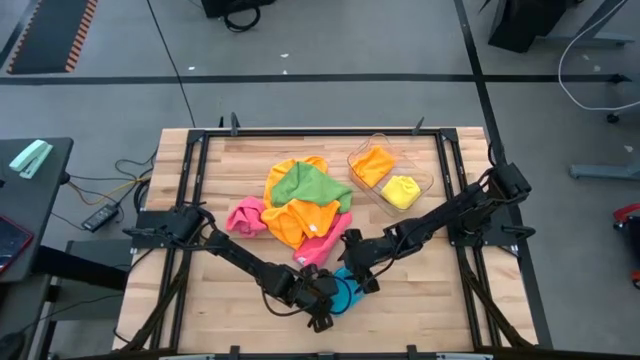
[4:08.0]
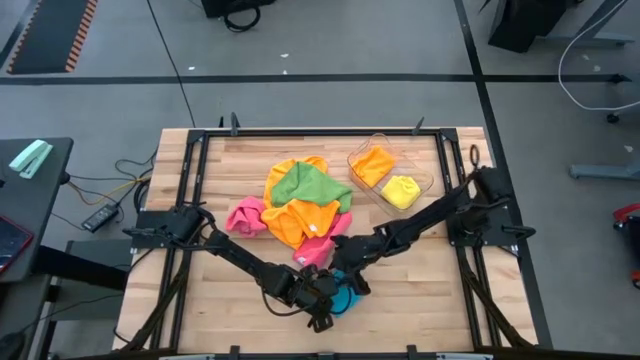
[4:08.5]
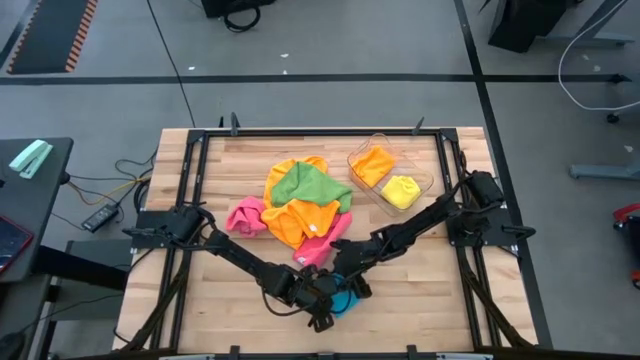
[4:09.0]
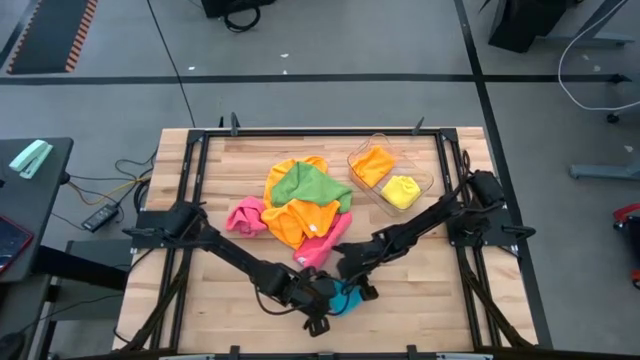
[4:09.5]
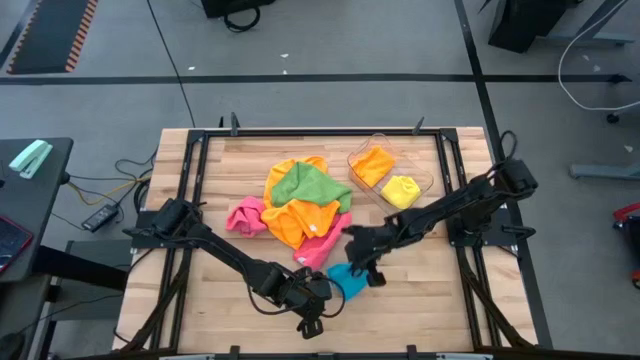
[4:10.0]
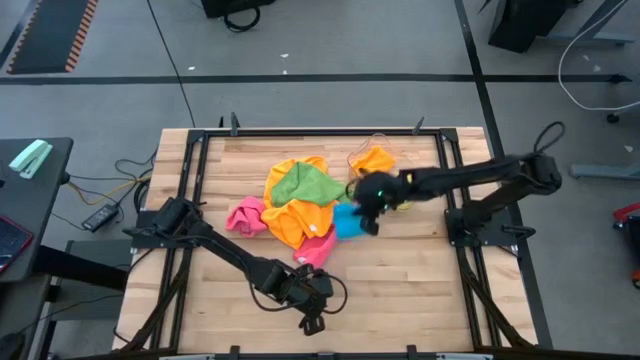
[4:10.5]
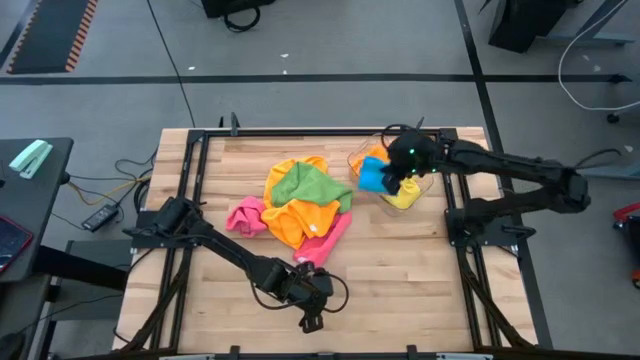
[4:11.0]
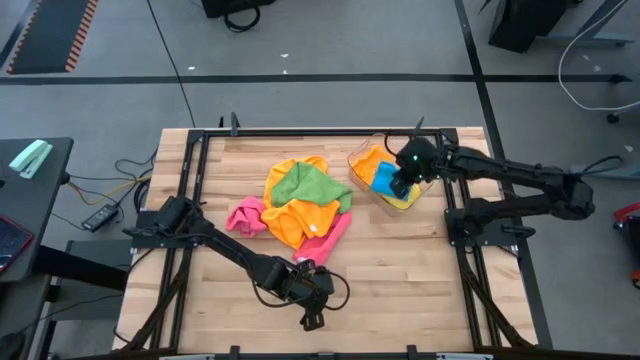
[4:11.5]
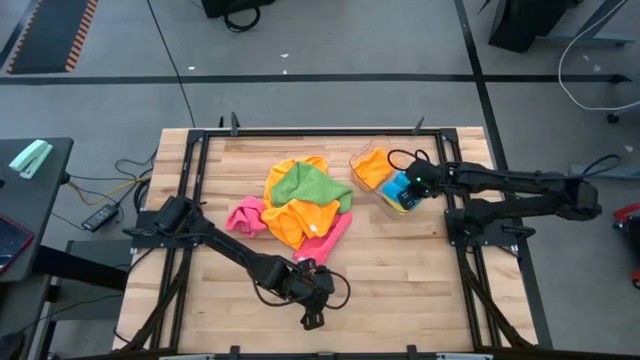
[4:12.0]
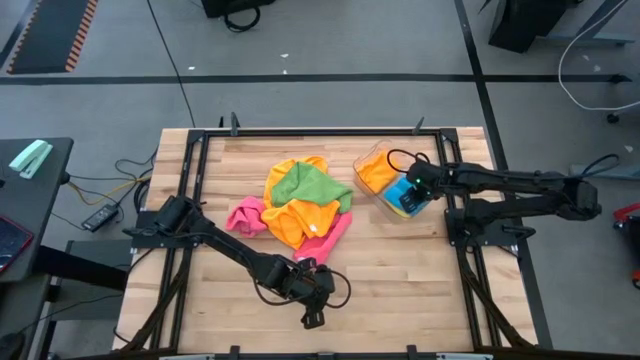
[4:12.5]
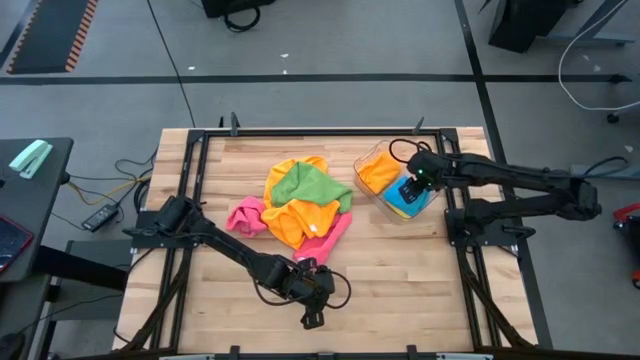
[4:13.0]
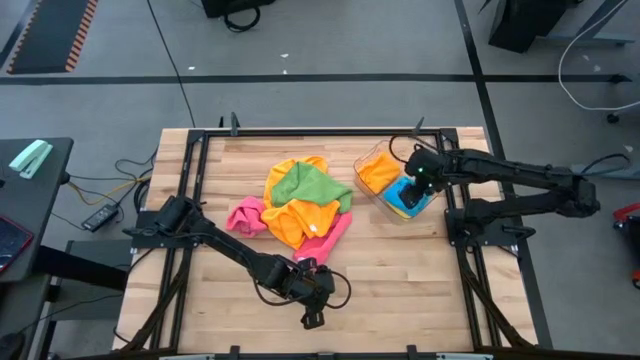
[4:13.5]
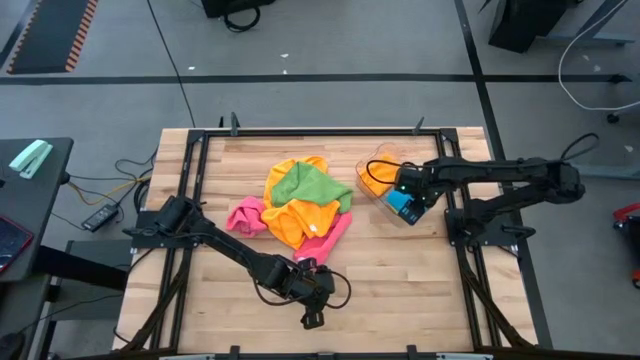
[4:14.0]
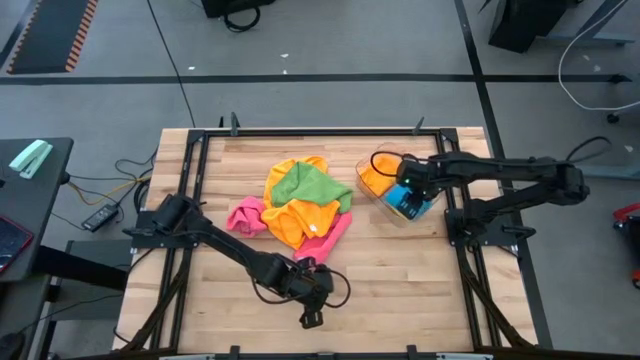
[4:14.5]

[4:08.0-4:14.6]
Task: Fold microfiber towels
Put the blue towel into the transparent bin

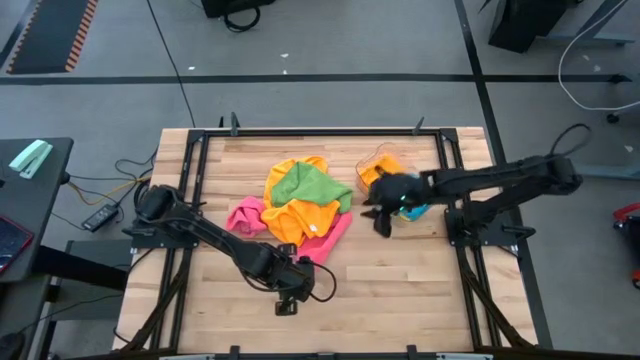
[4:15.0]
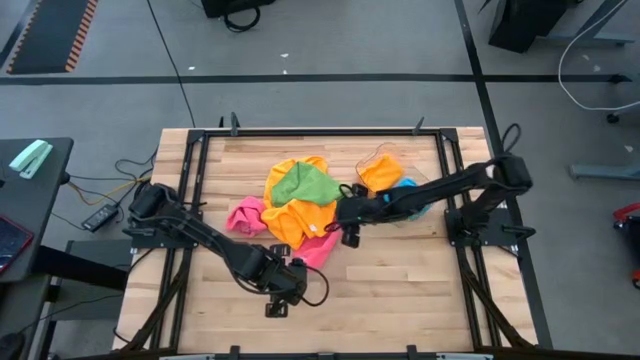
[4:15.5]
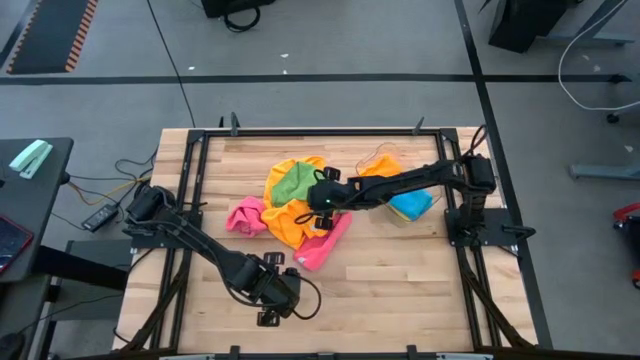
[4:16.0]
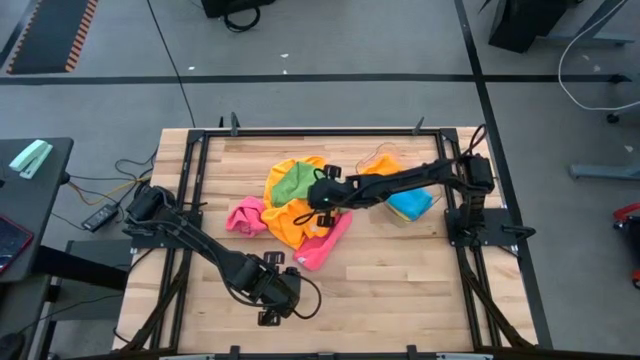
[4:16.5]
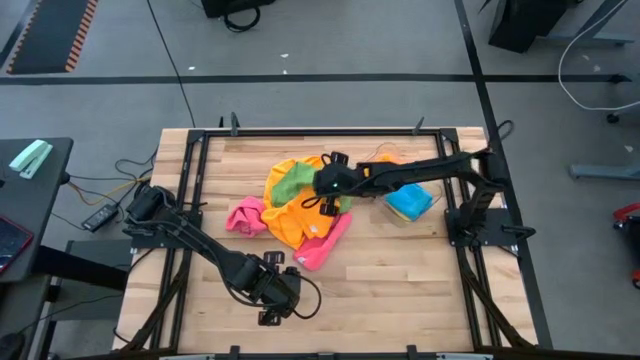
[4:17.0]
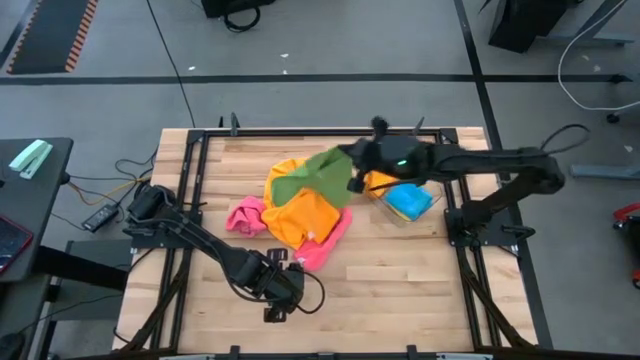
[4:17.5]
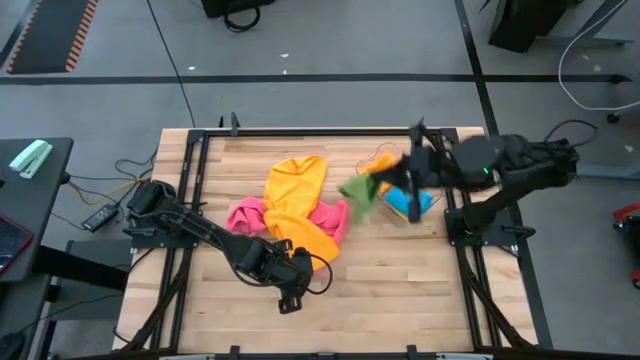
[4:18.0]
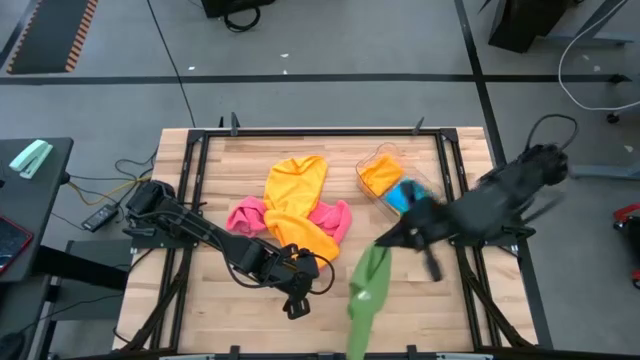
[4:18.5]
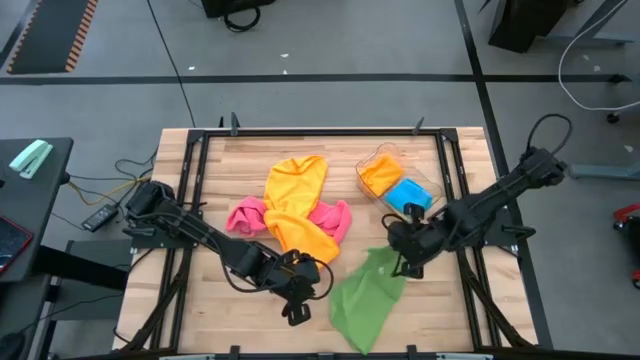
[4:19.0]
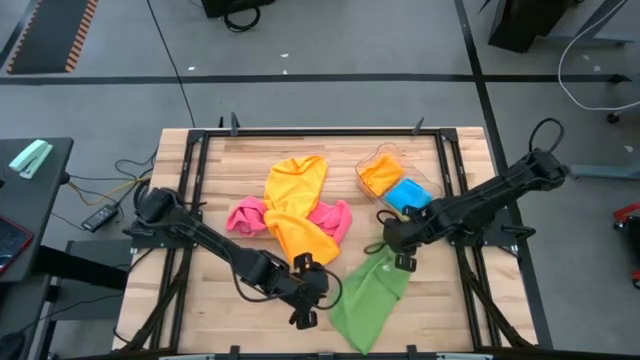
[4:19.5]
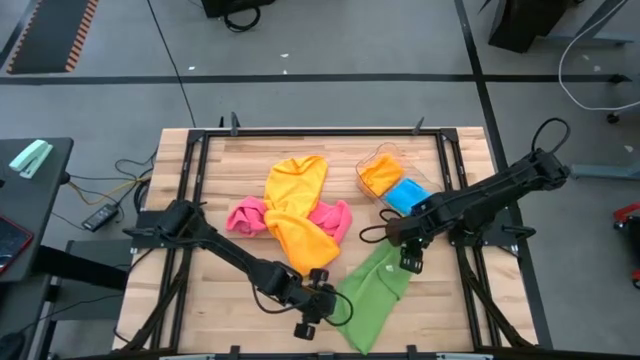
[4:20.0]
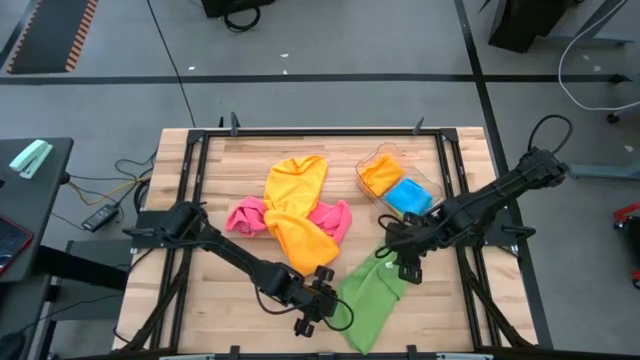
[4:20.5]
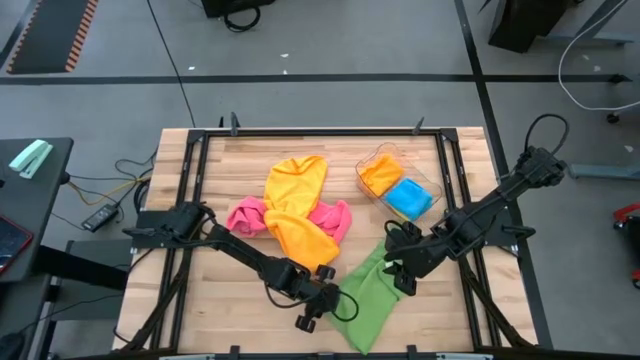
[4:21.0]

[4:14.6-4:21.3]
Fold the green towel

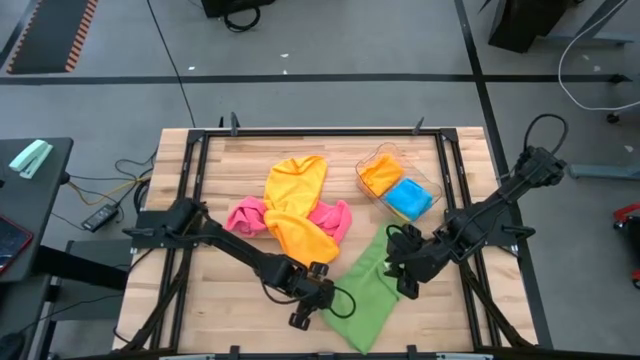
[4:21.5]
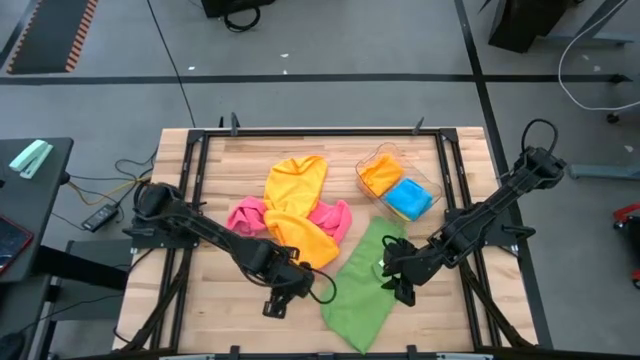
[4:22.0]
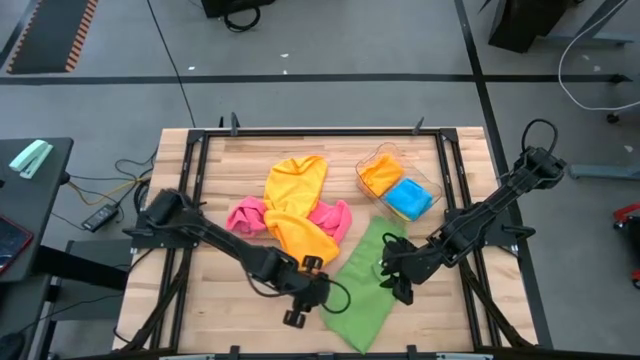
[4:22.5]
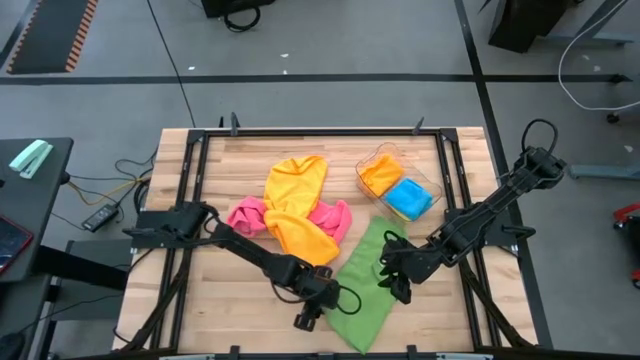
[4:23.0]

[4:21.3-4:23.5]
Fold the green towel

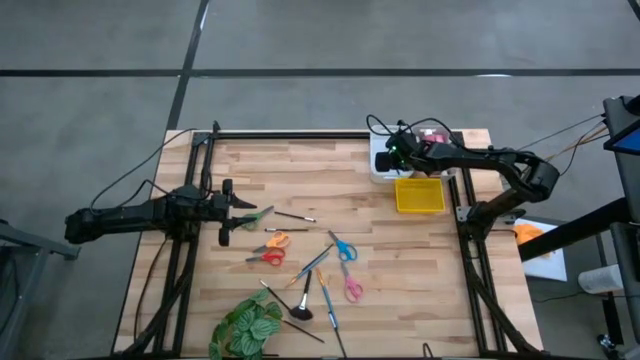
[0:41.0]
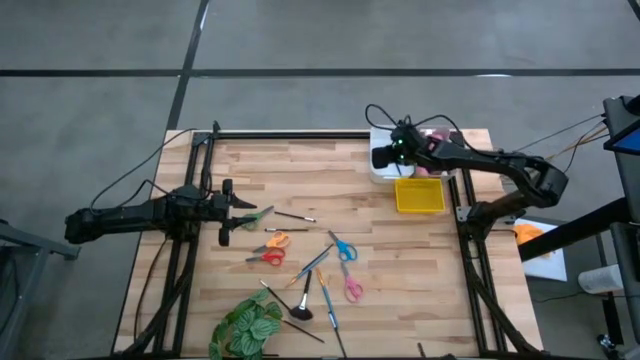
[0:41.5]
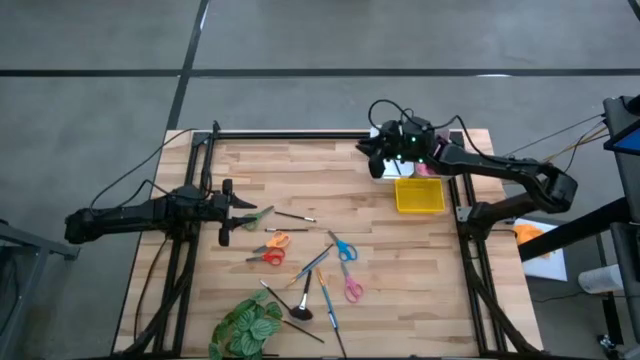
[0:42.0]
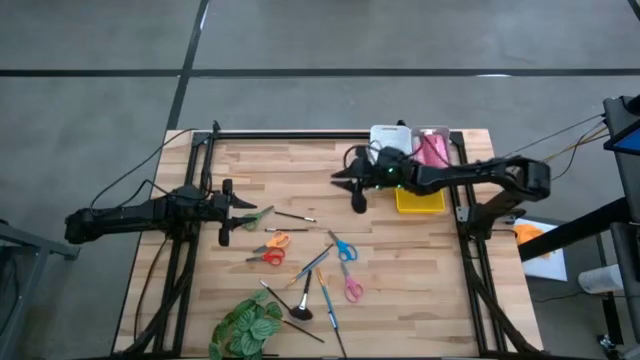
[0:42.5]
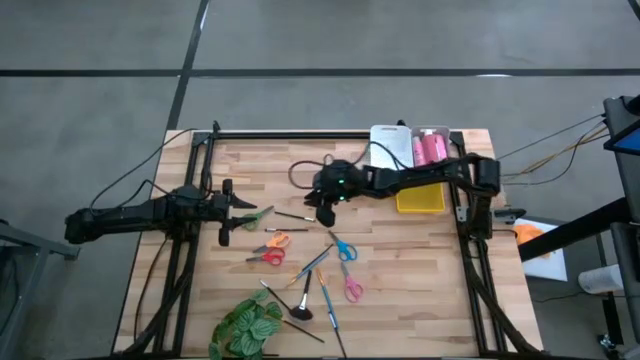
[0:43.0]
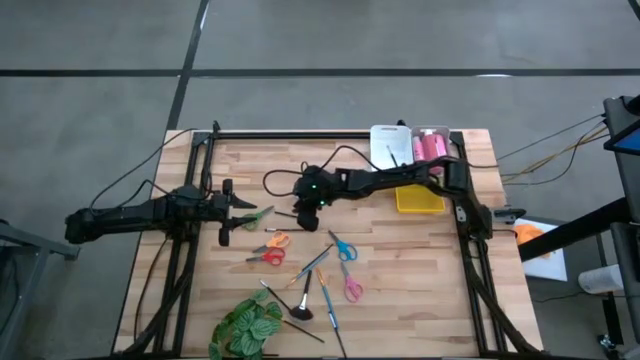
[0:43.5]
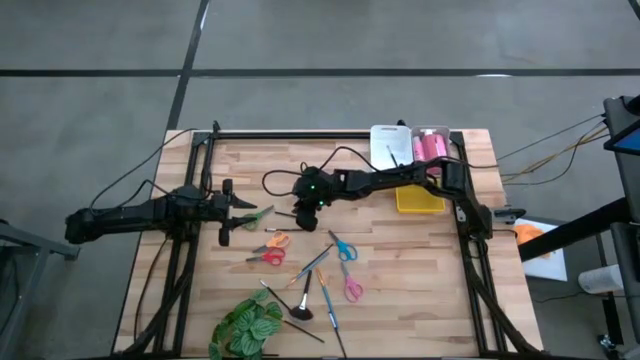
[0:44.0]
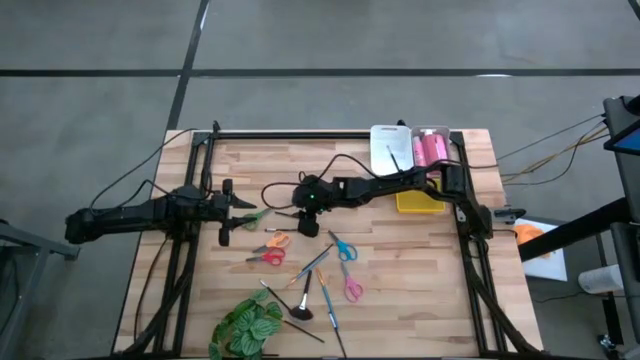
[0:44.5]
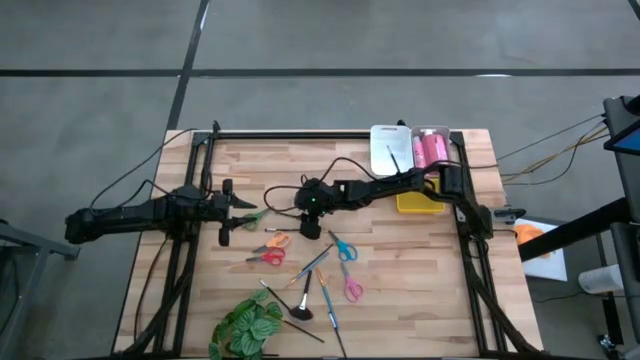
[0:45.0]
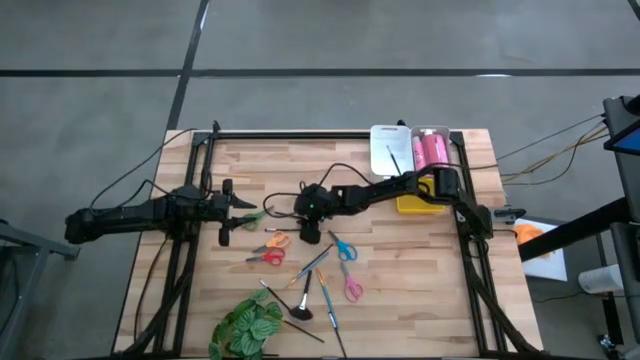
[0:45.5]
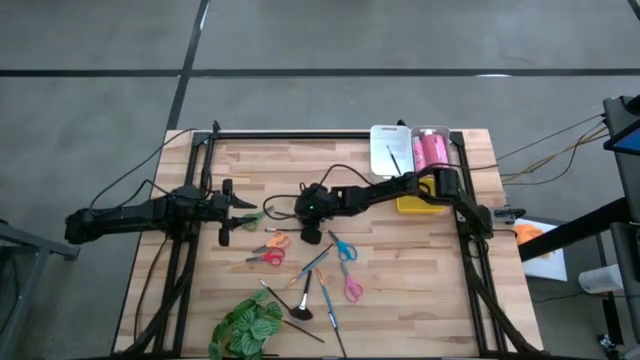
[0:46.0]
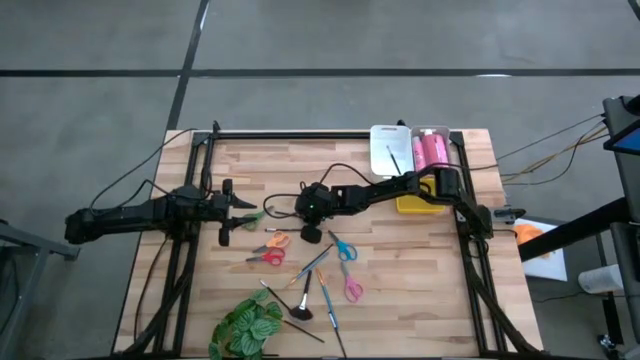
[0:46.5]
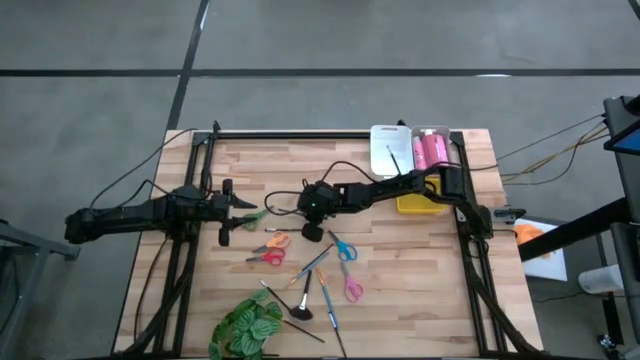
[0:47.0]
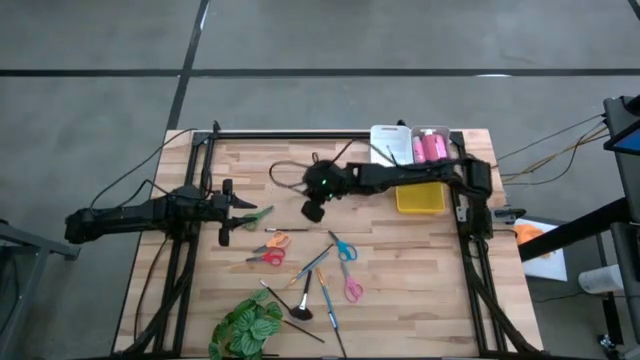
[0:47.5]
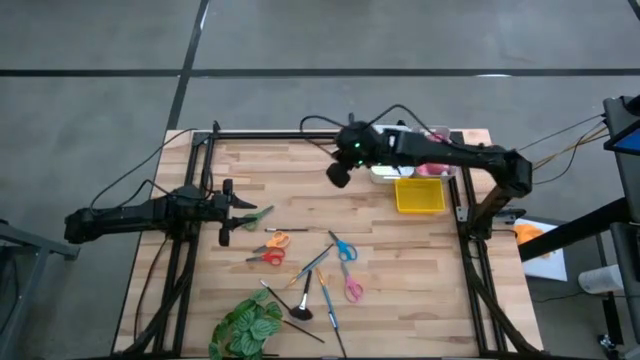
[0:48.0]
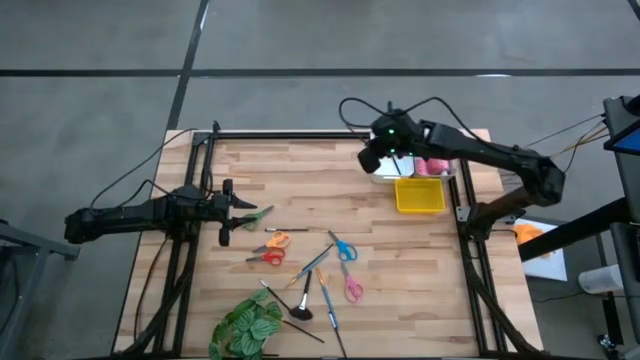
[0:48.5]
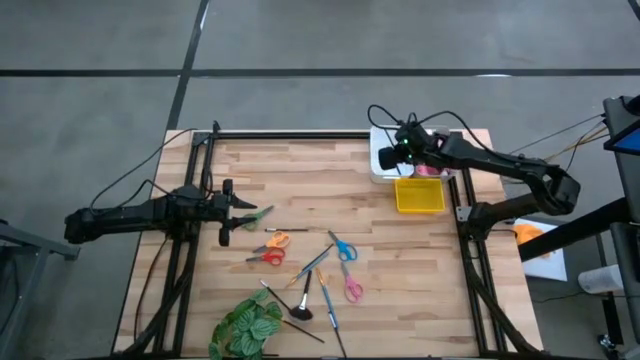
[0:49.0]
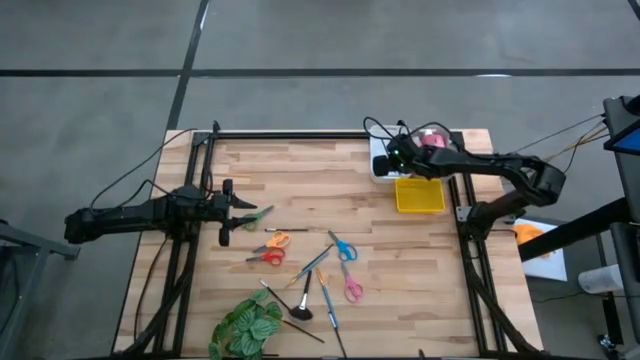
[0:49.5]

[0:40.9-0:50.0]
Task: Pick & Place Paint Supplies
Put the black paint brush into the white bin
